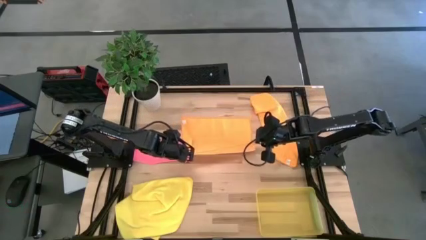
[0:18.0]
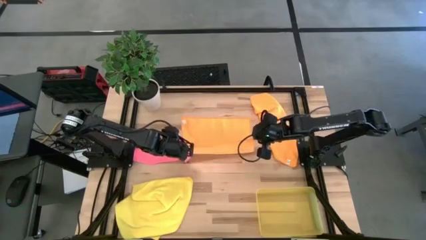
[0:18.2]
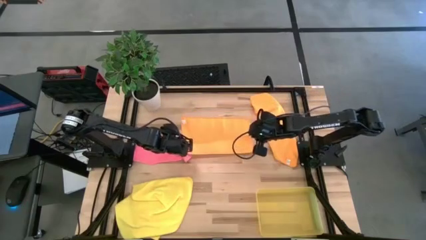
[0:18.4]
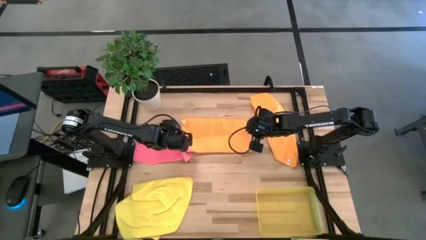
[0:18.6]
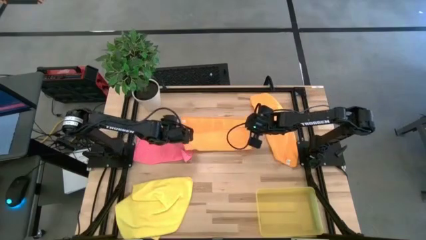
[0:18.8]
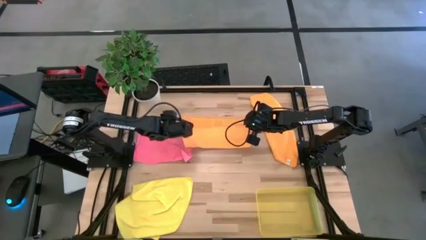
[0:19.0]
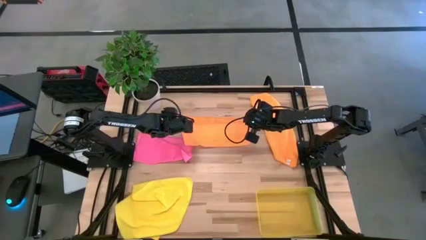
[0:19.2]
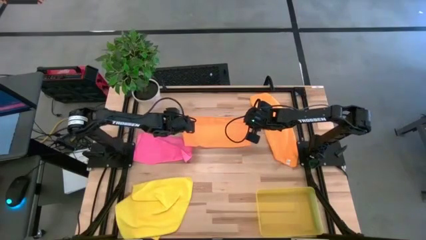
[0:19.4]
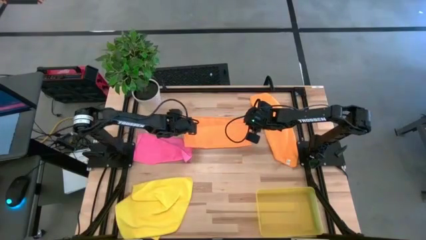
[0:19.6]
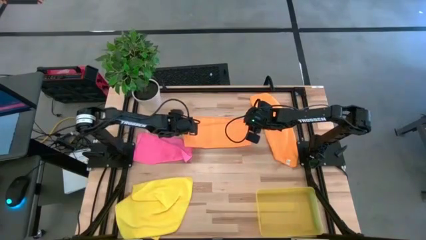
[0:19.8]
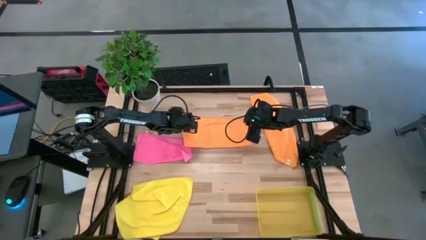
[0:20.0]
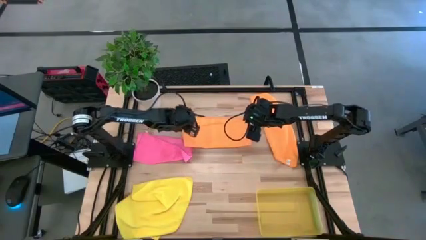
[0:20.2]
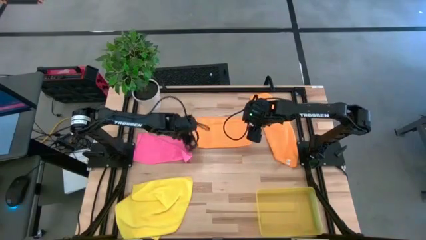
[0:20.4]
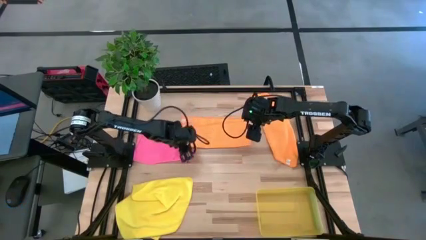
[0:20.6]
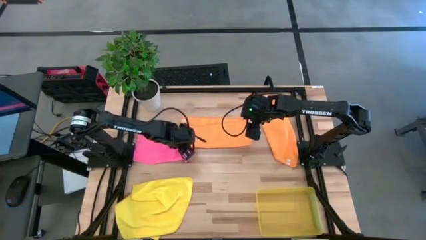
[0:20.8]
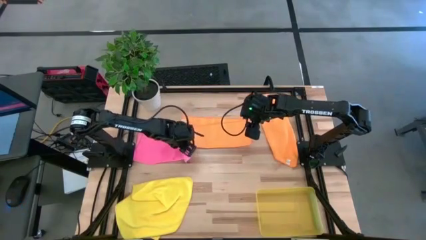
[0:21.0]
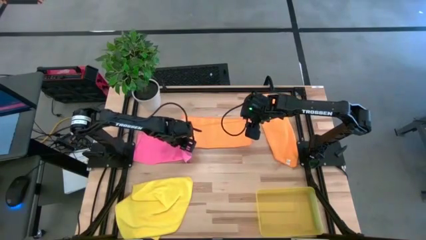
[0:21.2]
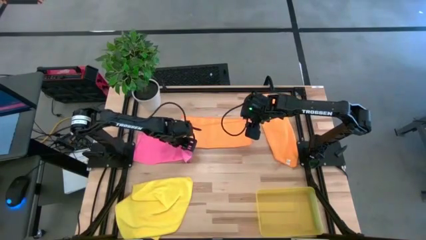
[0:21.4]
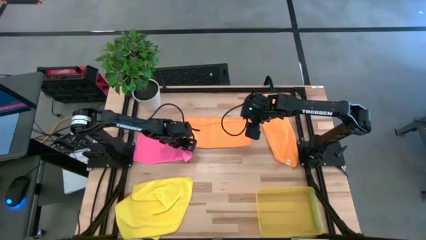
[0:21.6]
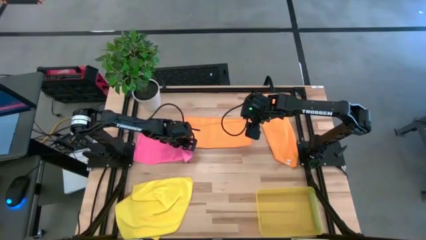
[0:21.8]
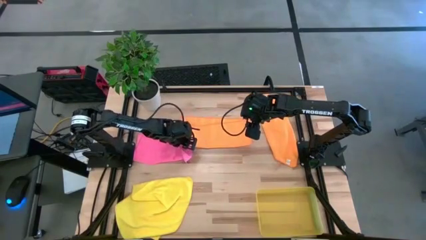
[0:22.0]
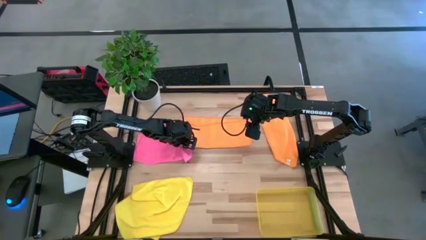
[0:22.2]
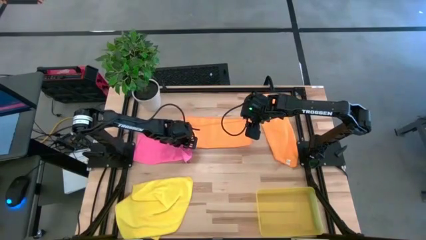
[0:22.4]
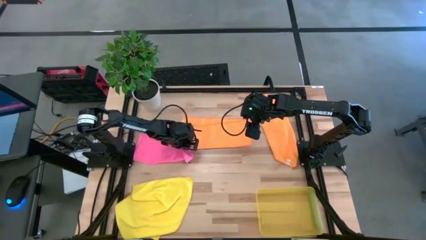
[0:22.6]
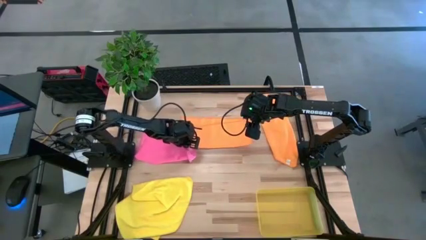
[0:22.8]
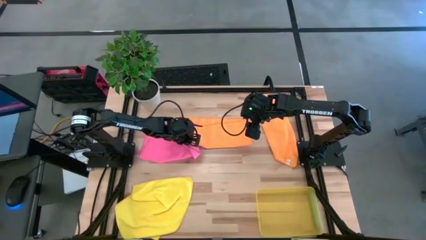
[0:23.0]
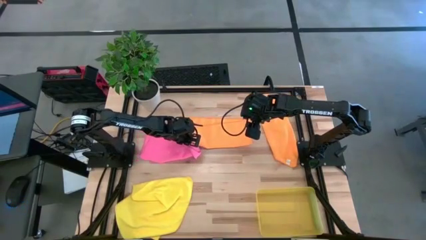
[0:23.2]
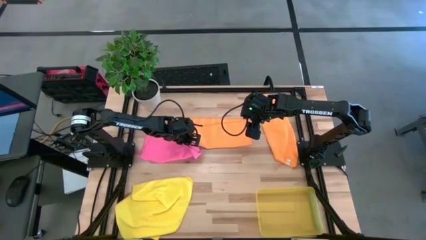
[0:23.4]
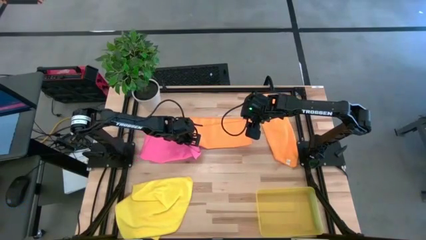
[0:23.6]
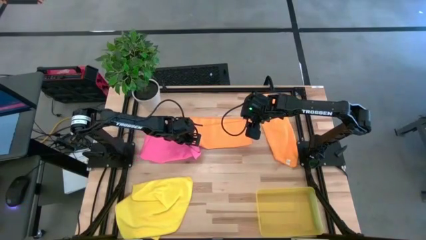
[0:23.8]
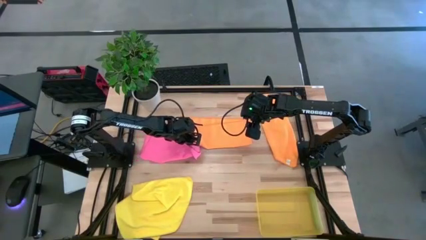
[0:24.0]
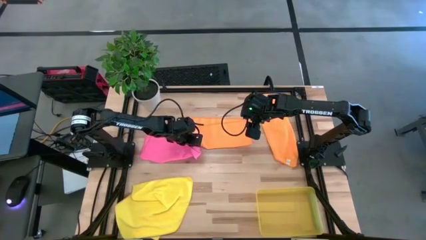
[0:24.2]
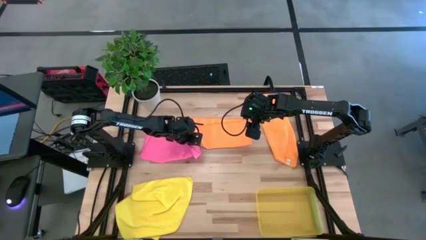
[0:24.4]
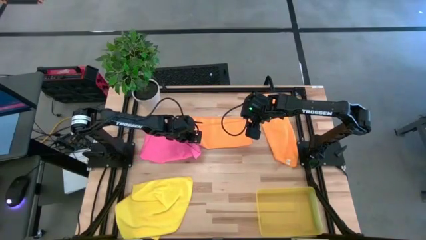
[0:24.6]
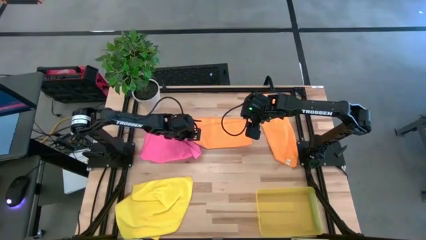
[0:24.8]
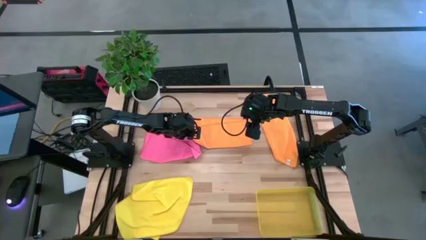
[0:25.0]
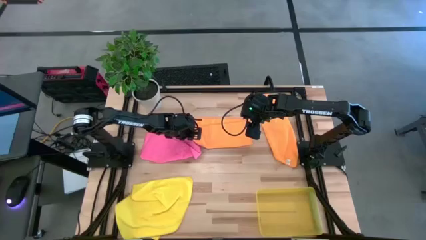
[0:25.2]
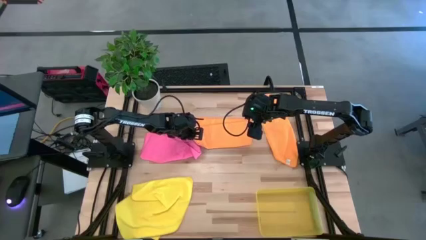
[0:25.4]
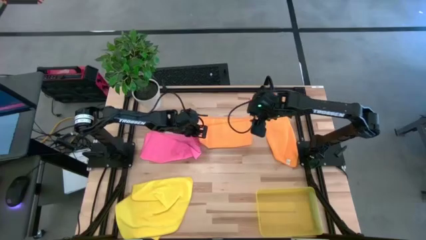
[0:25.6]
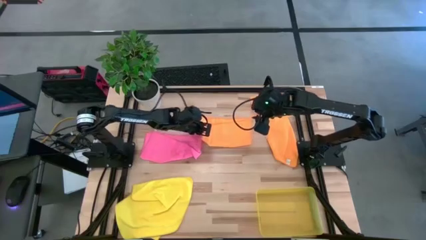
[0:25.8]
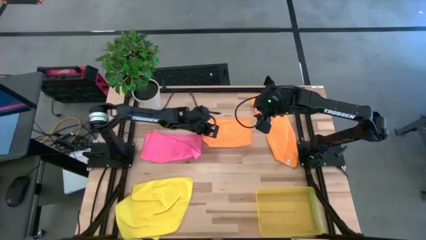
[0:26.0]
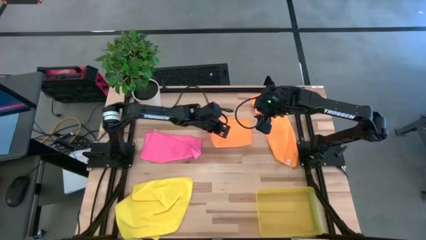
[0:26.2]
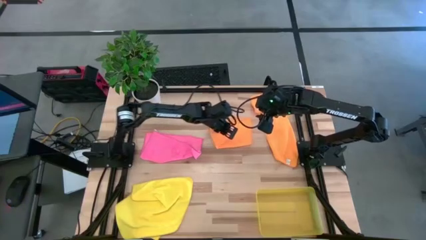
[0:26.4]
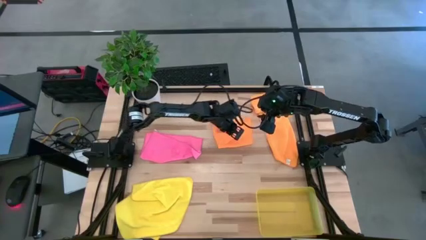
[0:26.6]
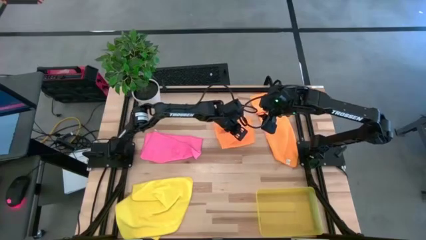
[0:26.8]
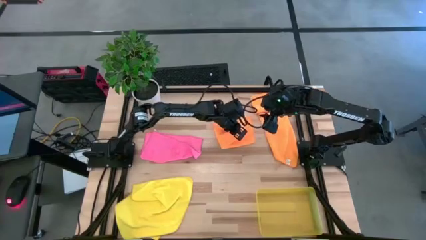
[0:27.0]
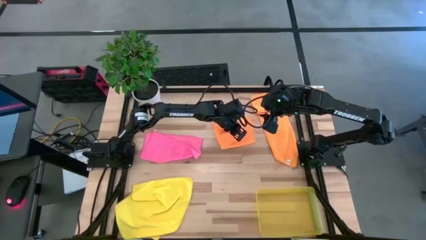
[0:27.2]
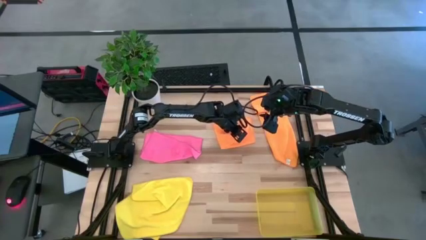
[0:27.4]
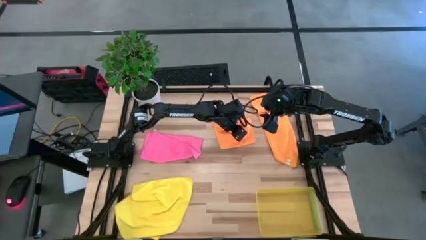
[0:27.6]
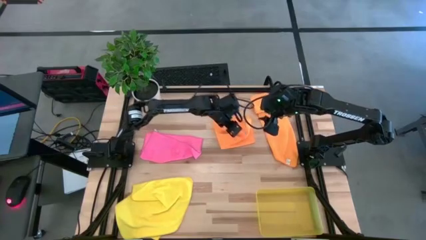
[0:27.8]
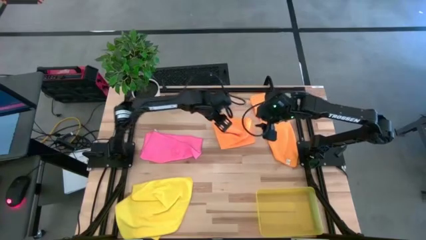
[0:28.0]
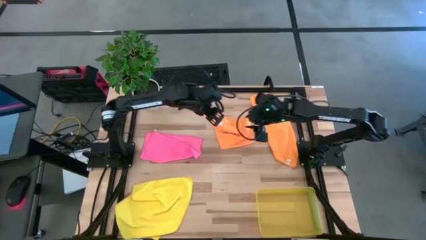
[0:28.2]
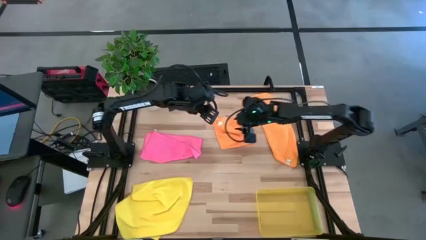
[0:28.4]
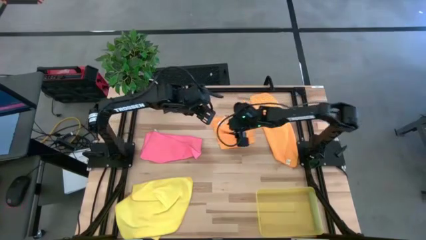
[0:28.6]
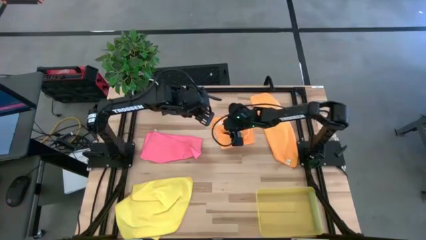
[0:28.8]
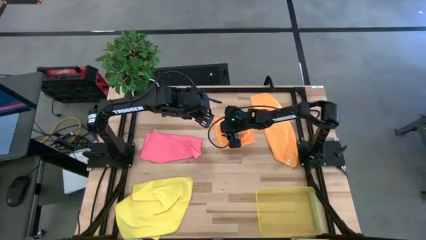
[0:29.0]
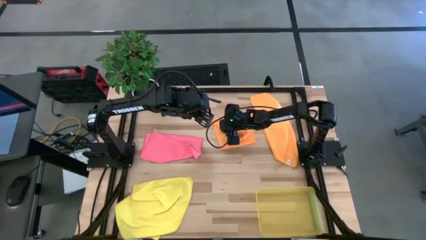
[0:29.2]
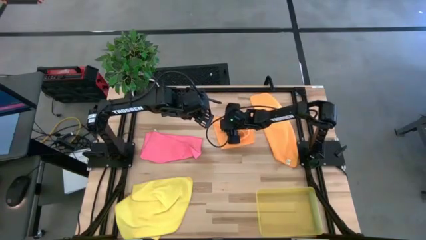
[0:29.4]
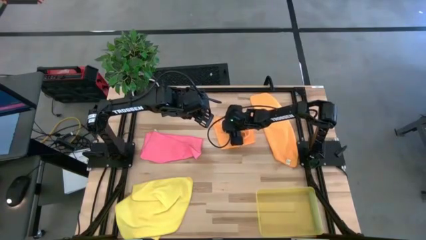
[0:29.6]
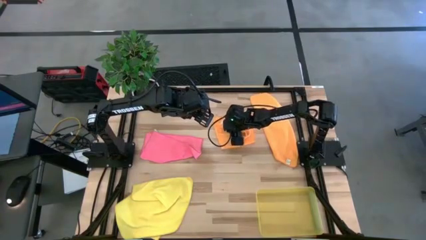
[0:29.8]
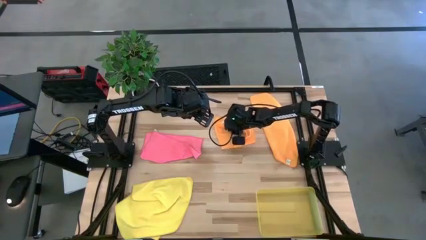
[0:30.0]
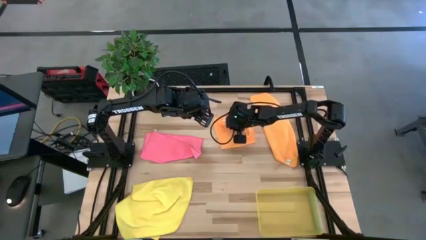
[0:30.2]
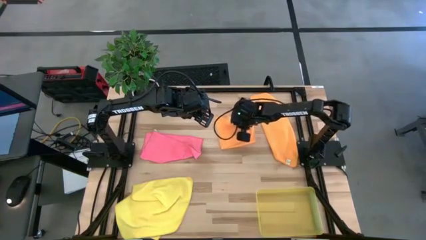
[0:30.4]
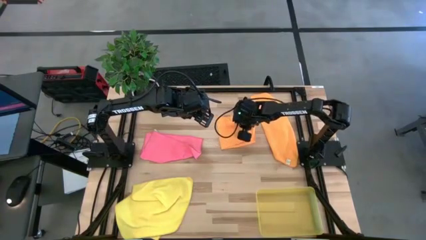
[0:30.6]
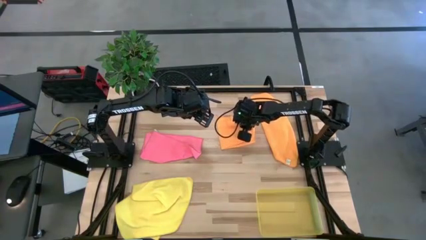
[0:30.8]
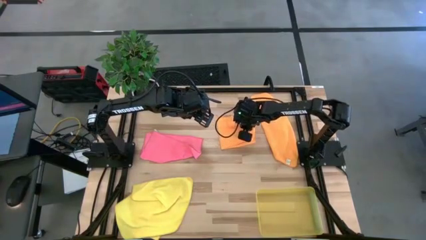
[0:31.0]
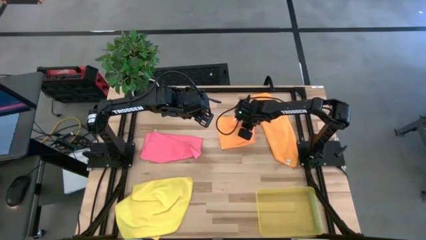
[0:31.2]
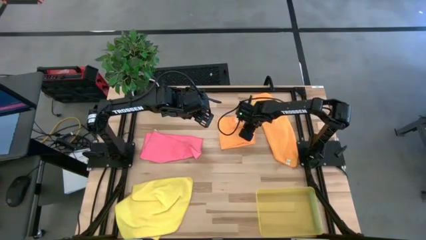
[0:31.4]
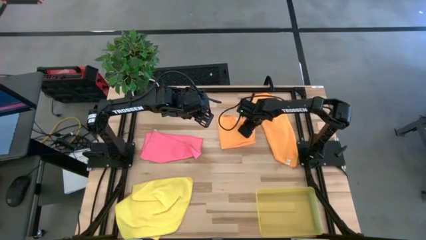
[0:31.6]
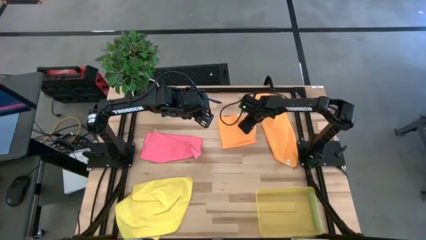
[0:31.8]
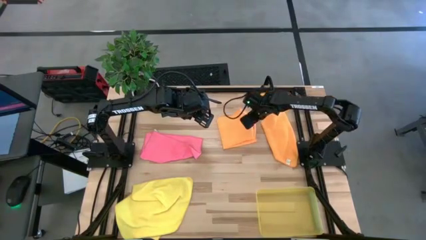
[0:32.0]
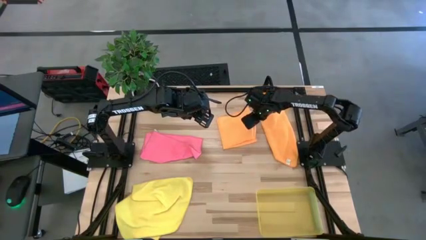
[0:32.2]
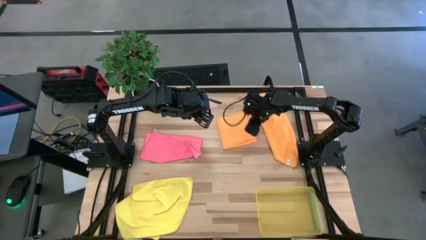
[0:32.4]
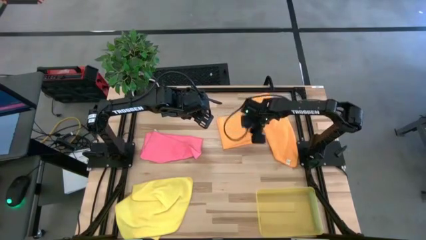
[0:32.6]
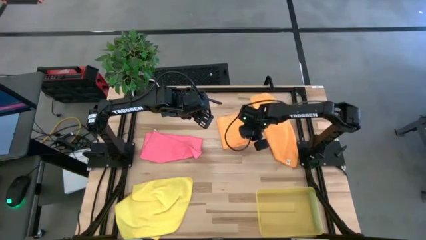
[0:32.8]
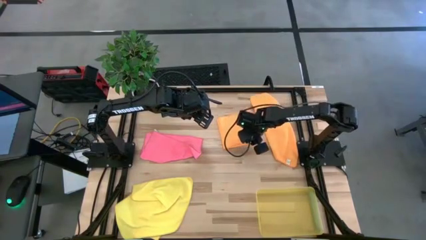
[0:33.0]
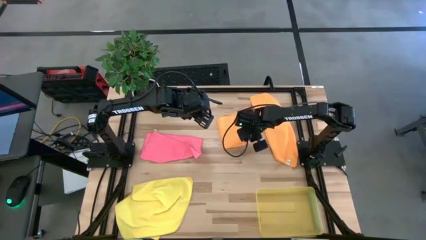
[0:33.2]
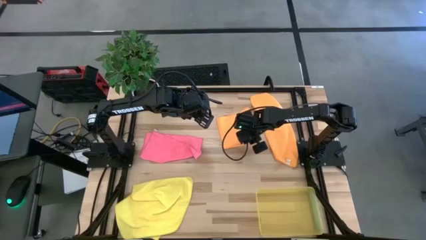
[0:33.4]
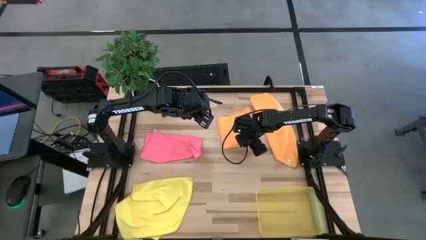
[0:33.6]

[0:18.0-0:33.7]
Task: Fold microfiber towels
Fold the left orange microfiber cloth
